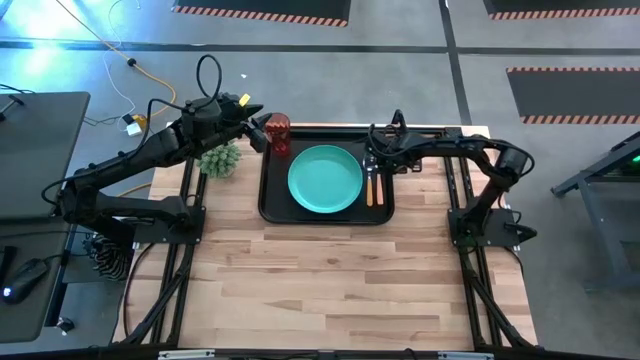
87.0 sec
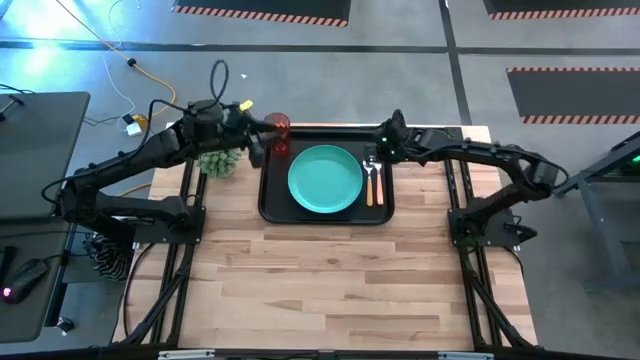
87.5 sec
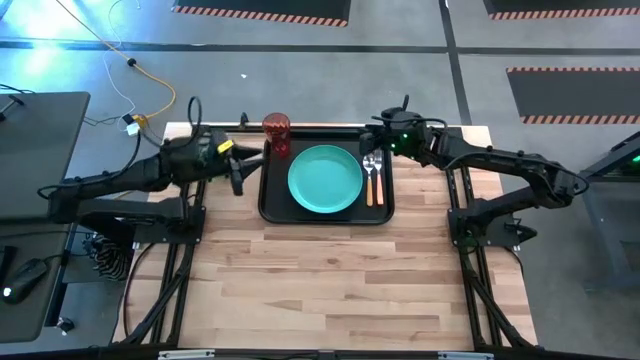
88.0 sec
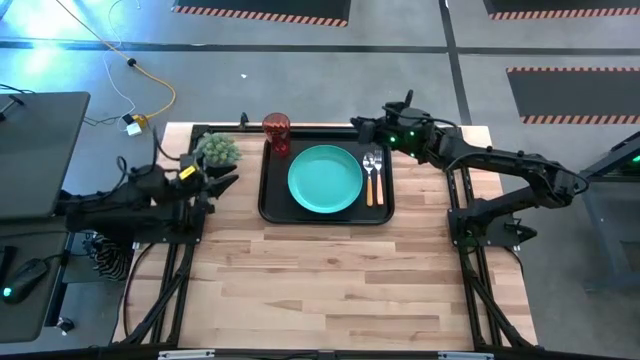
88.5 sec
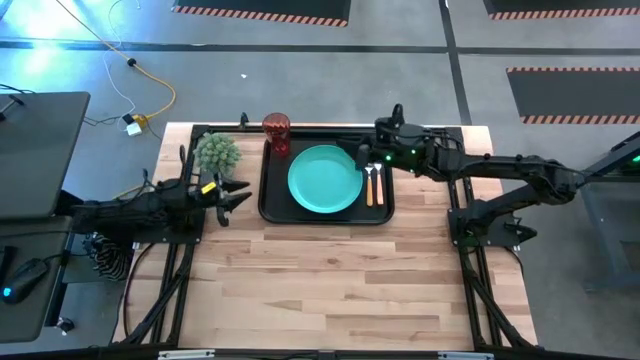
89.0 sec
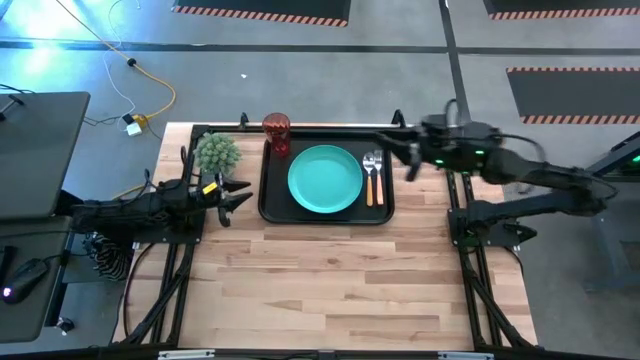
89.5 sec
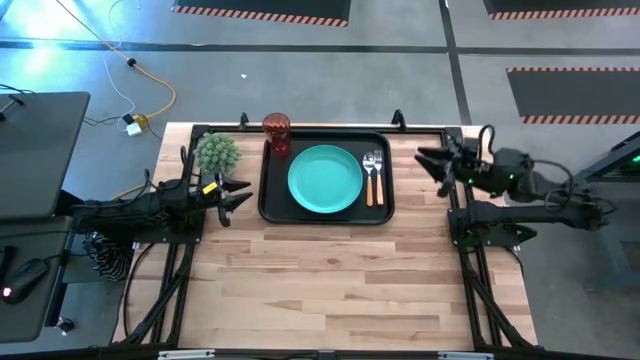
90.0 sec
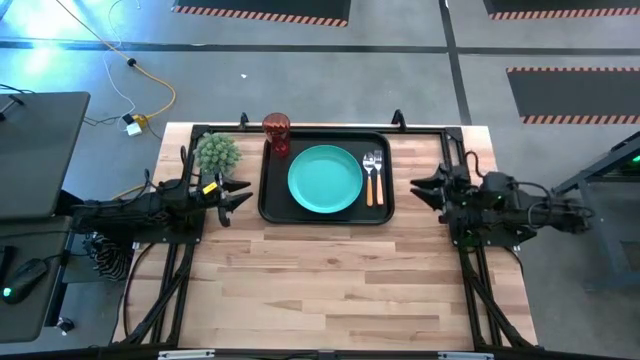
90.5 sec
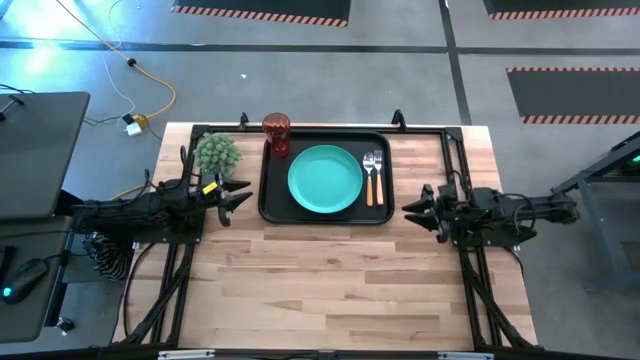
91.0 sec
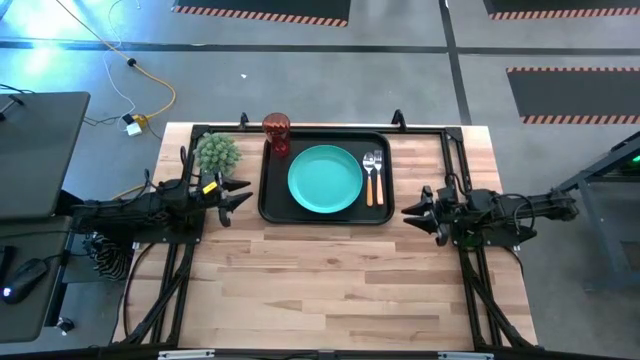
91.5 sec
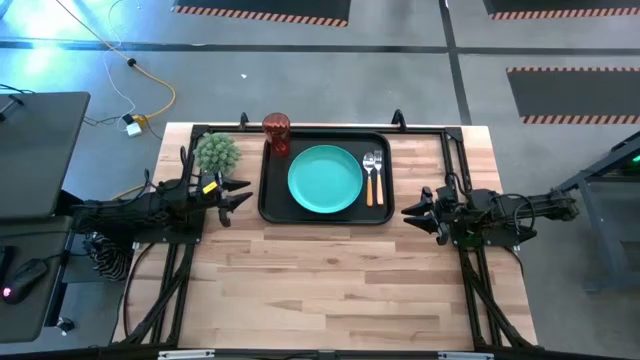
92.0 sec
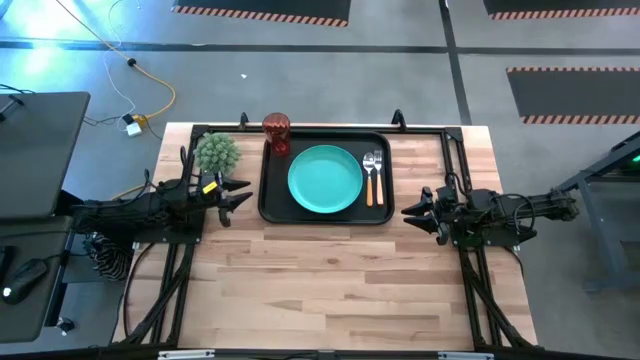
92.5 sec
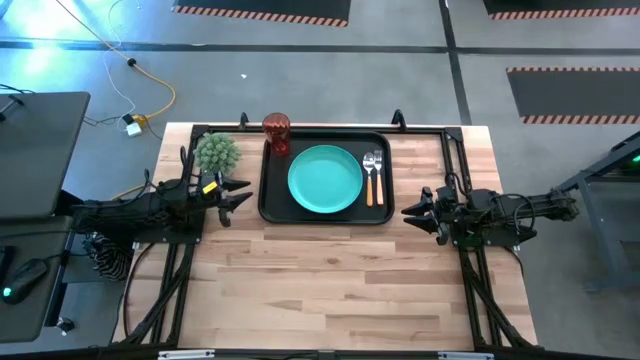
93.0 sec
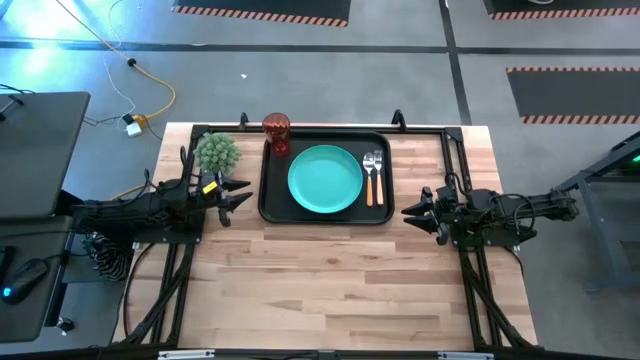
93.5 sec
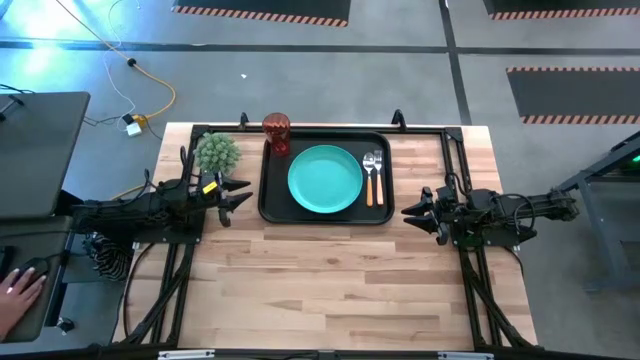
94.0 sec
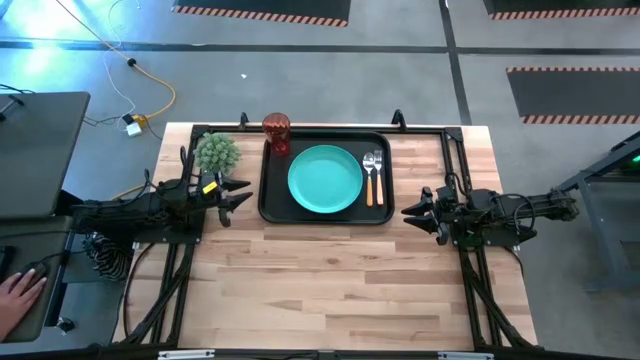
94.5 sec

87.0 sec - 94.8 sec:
Task: Pick and place plate/cup/fork/spoon on tray
Return to Home Position

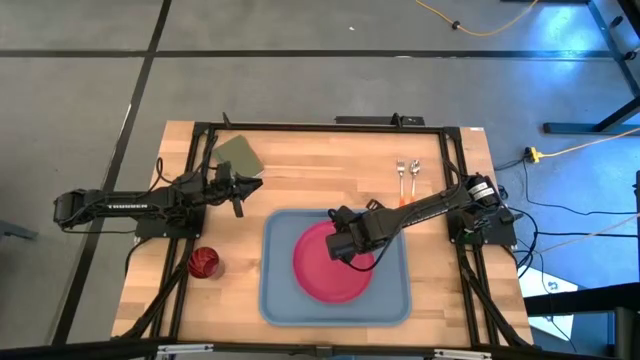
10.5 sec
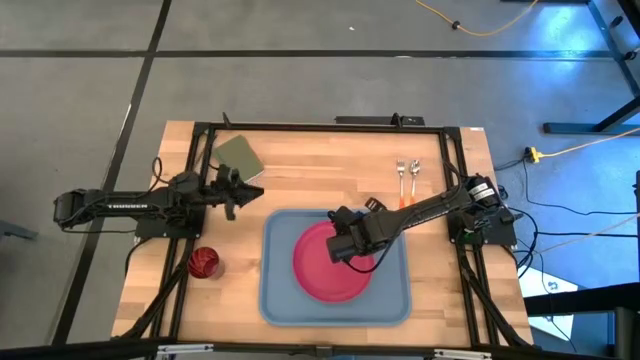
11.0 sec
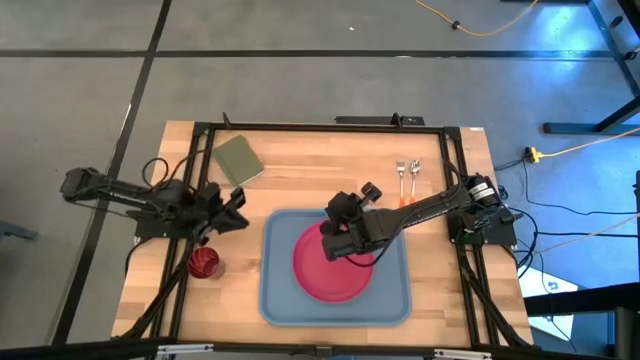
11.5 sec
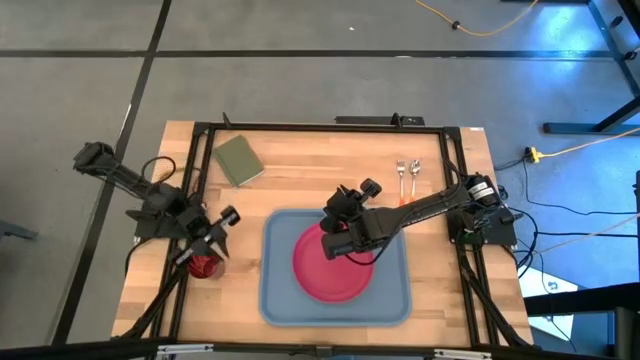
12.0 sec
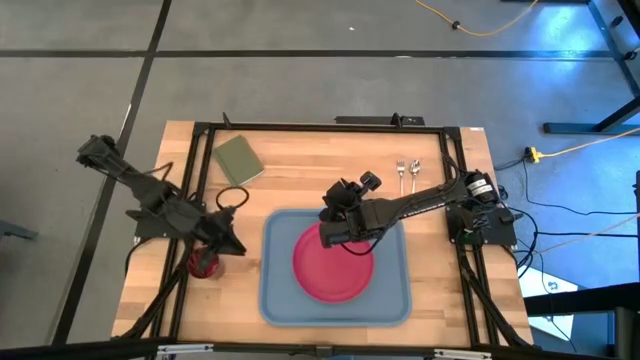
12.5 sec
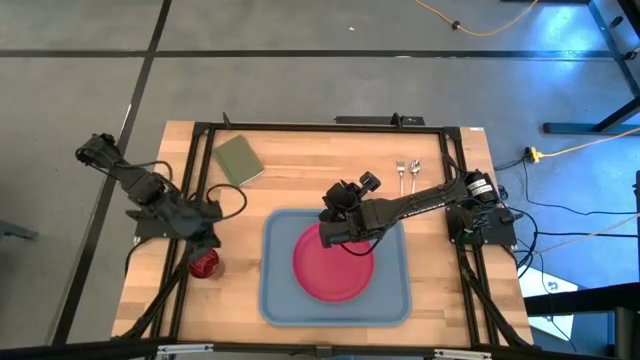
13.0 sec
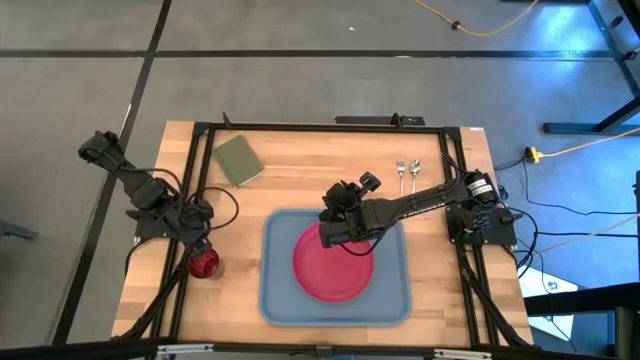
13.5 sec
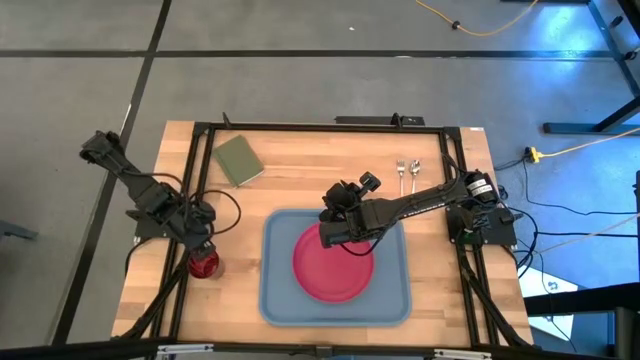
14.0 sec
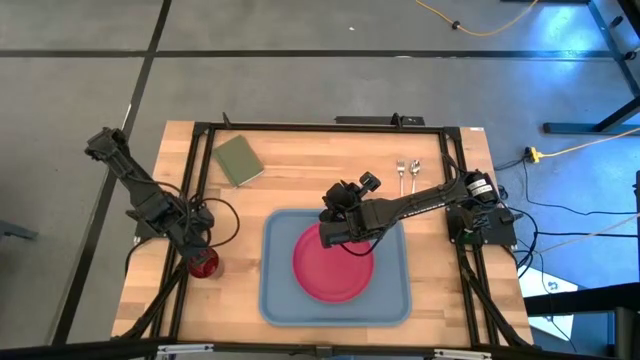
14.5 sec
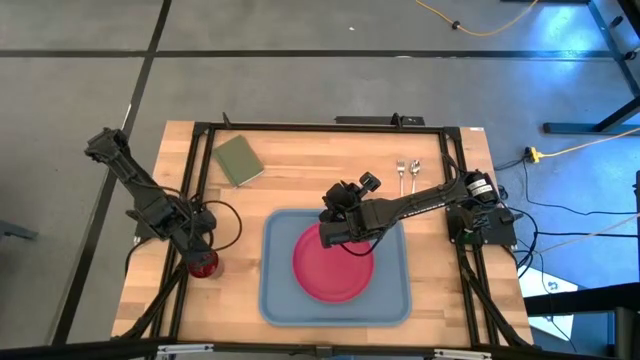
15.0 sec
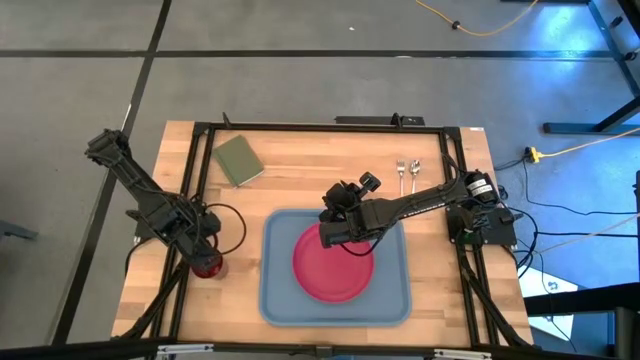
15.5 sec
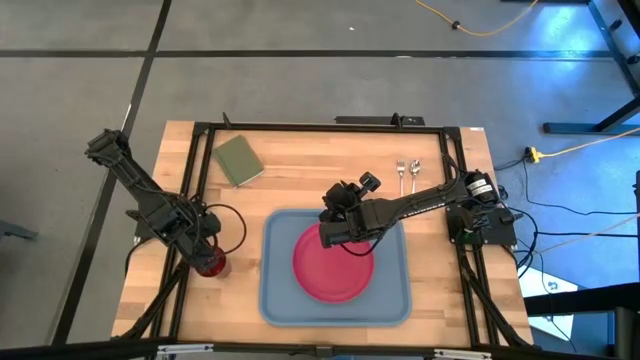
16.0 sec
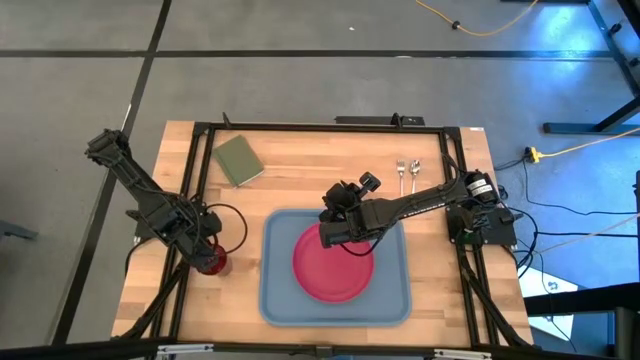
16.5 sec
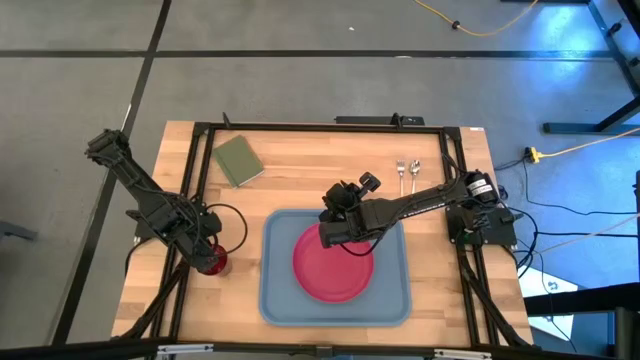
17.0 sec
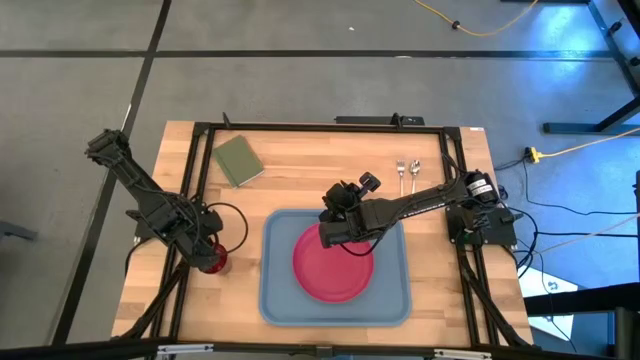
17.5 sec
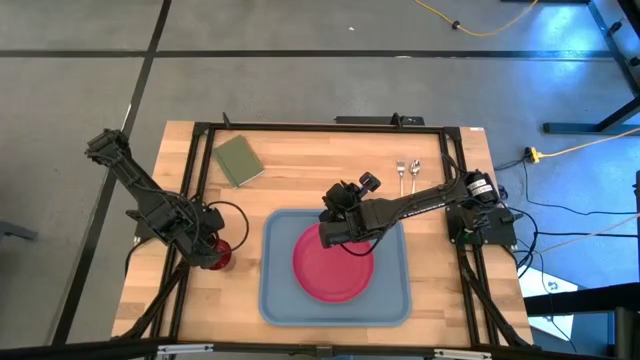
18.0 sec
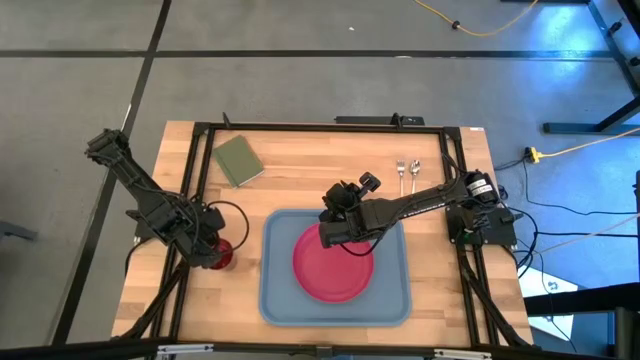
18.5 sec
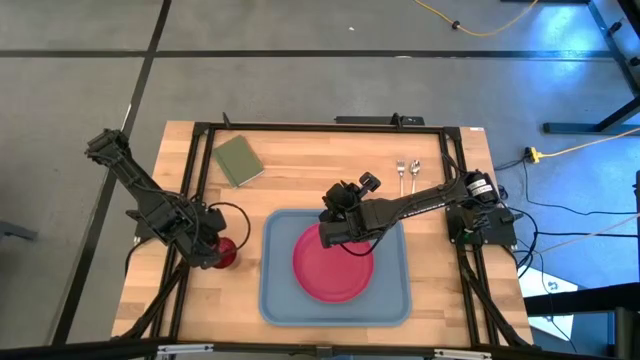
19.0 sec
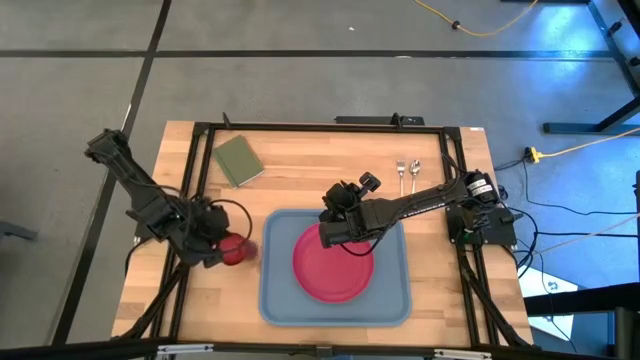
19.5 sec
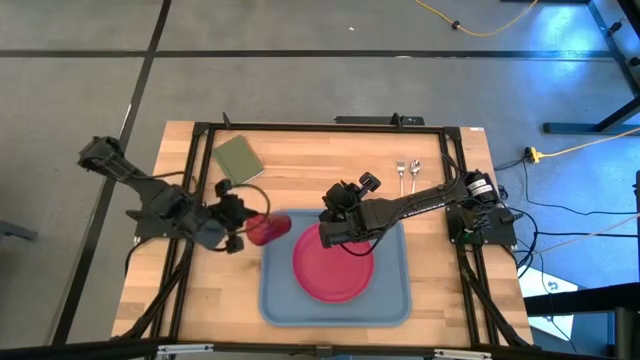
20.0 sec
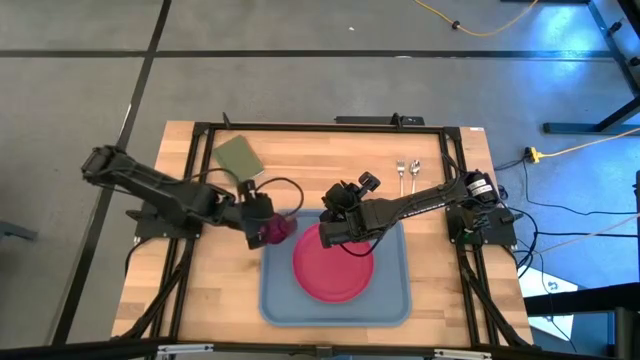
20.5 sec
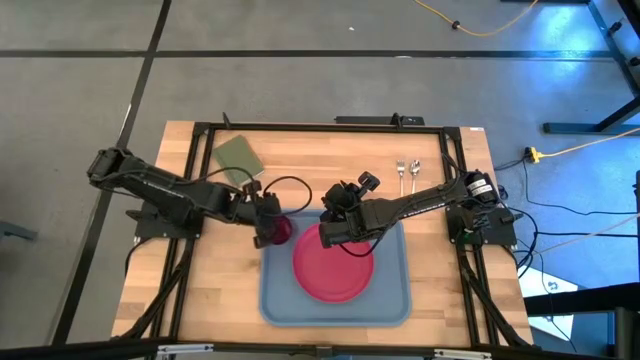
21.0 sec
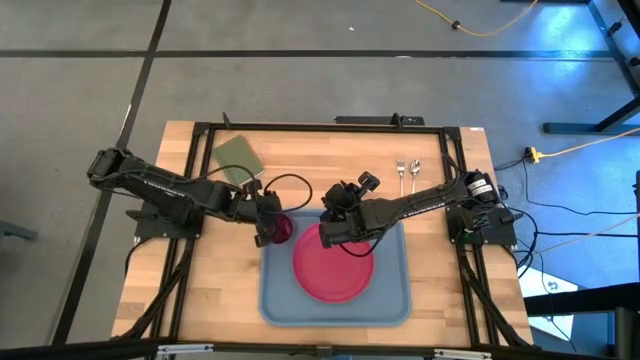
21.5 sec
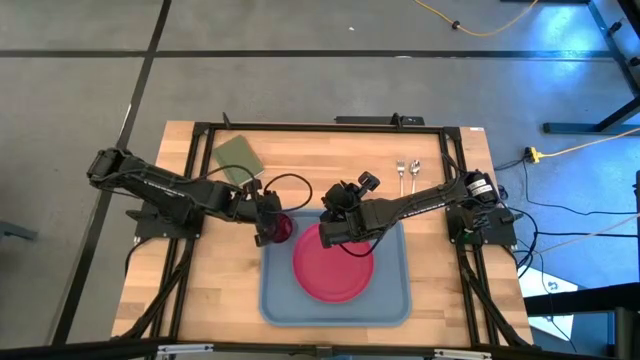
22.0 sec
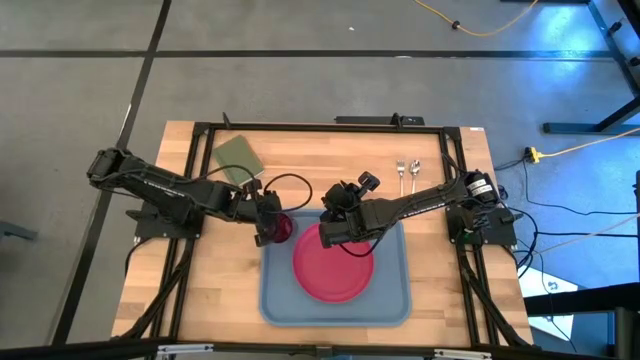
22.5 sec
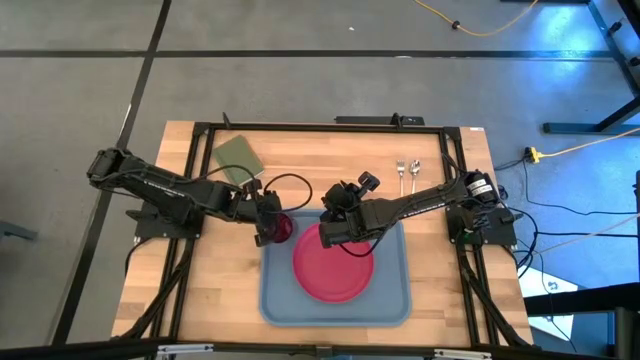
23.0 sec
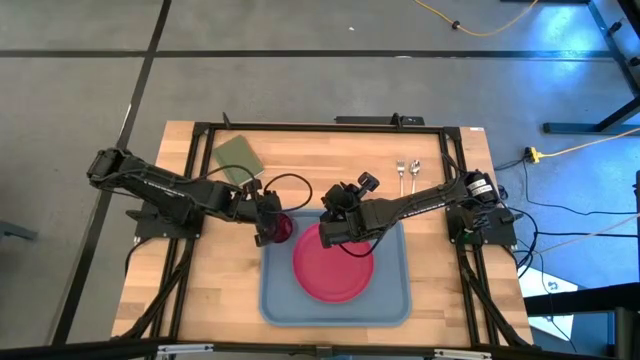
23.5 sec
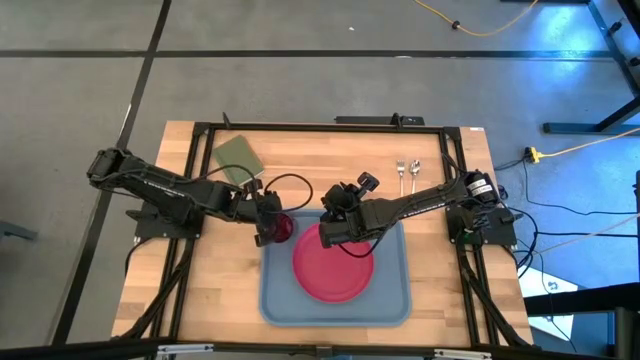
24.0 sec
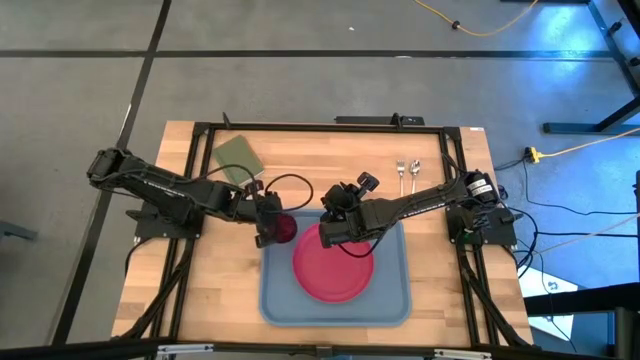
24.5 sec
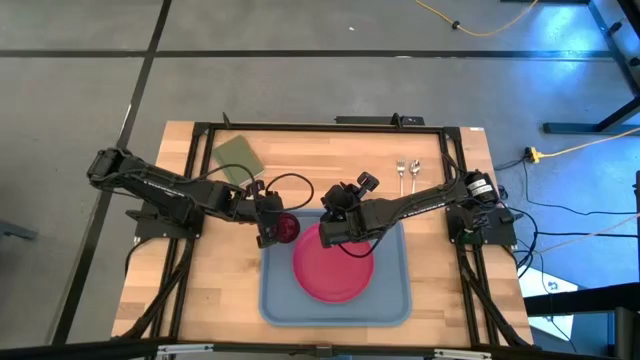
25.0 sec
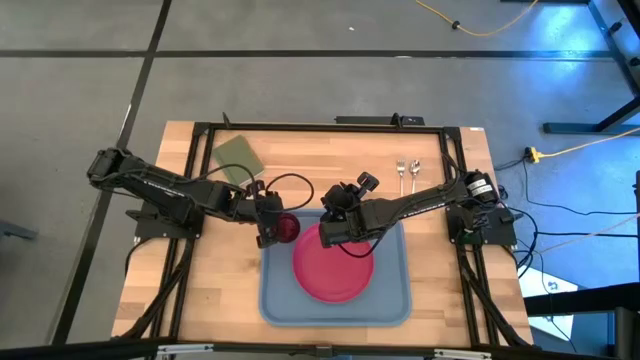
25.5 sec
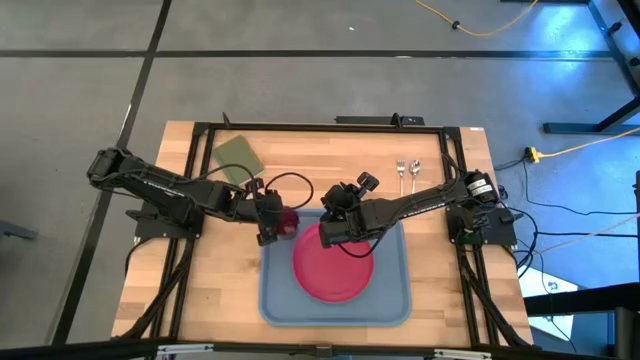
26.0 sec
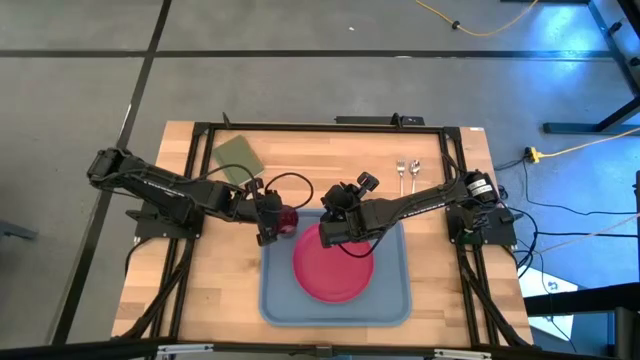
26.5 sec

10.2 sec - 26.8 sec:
Task: Pick and place plate/cup/fork/spoon on tray
Put the red cup on the blue serving tray to the top left of the pink plate
